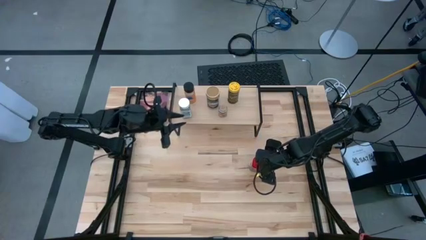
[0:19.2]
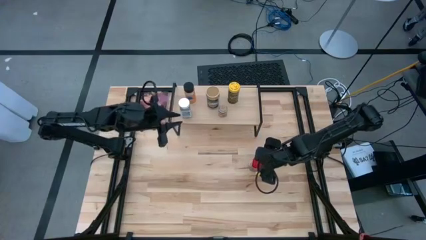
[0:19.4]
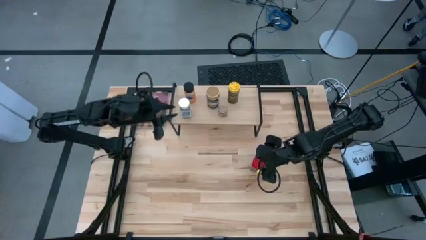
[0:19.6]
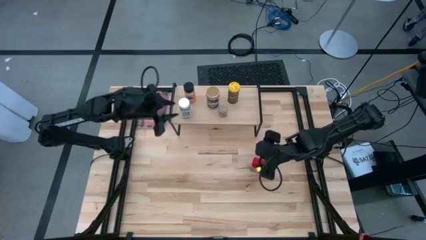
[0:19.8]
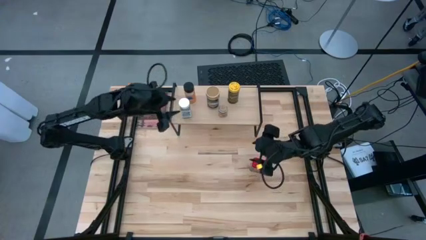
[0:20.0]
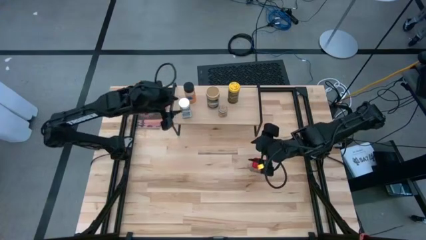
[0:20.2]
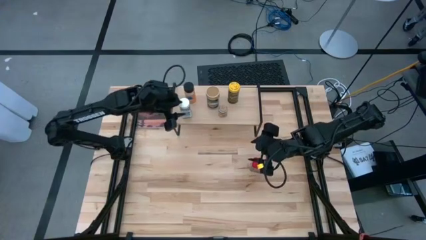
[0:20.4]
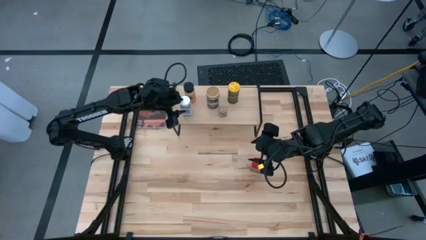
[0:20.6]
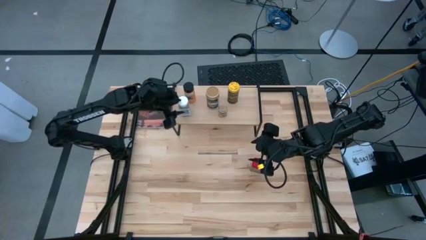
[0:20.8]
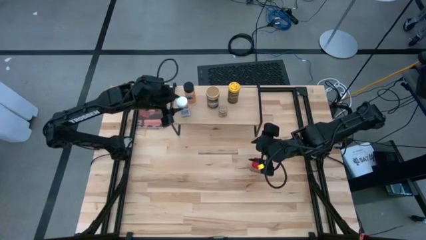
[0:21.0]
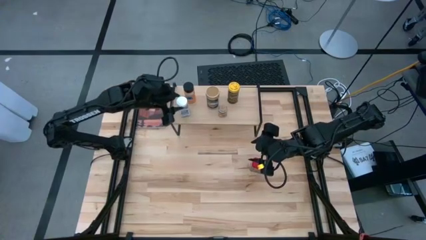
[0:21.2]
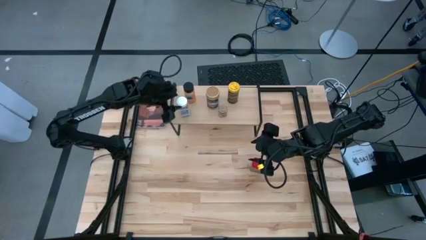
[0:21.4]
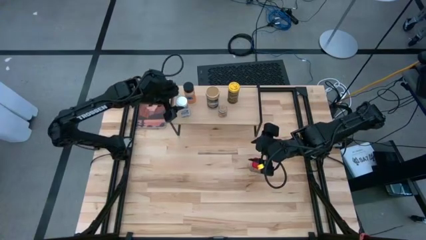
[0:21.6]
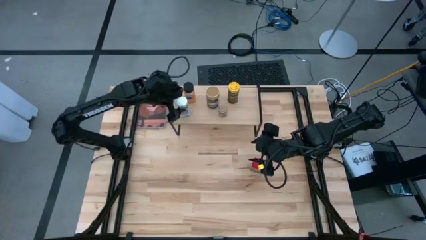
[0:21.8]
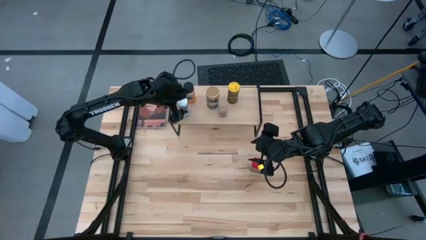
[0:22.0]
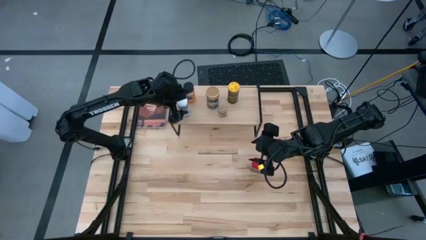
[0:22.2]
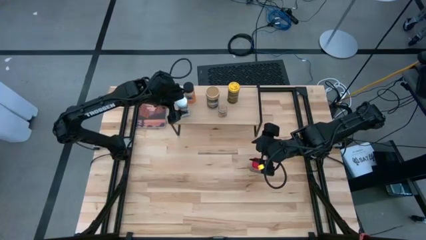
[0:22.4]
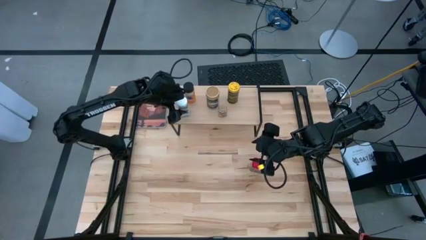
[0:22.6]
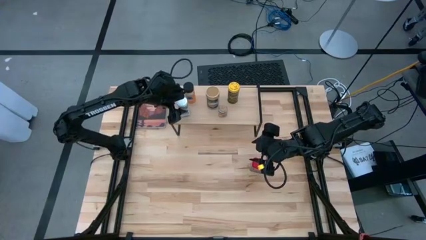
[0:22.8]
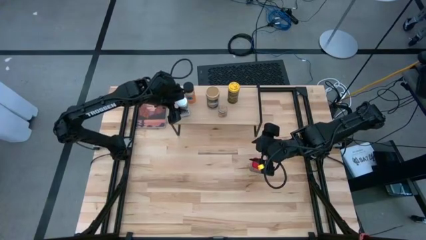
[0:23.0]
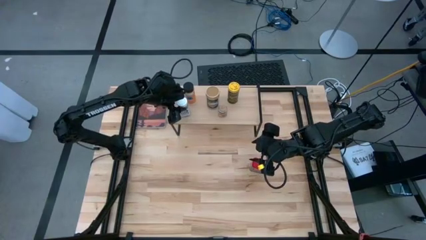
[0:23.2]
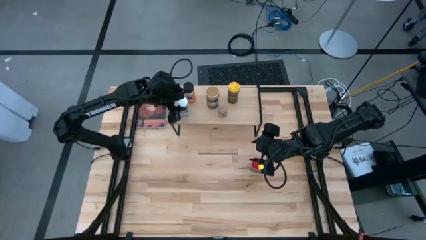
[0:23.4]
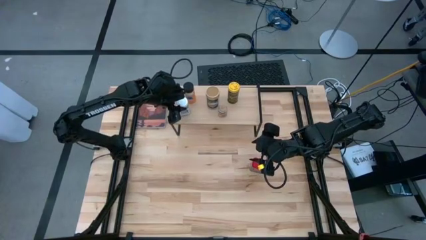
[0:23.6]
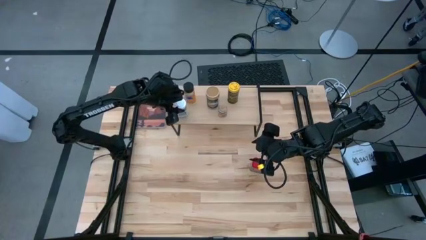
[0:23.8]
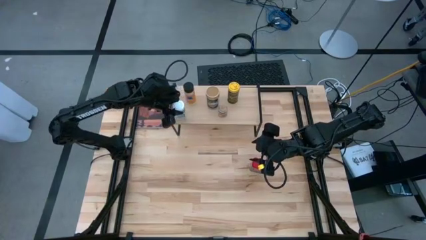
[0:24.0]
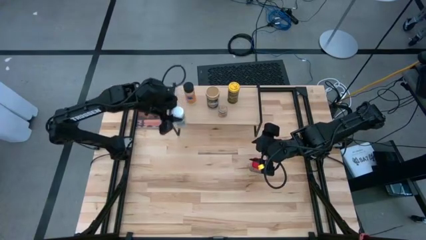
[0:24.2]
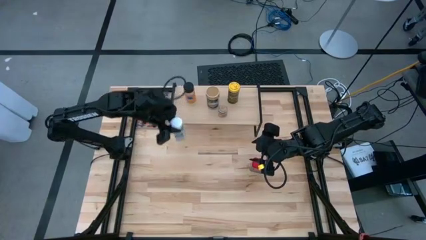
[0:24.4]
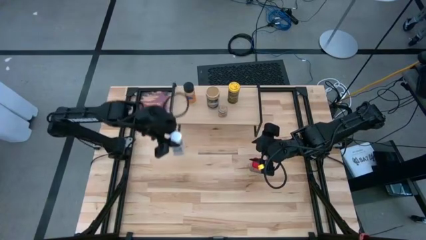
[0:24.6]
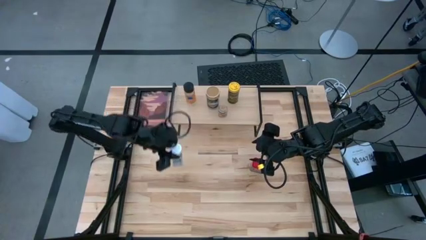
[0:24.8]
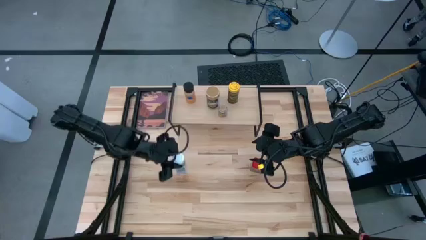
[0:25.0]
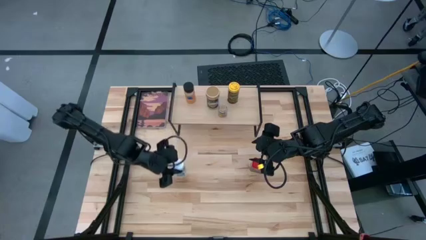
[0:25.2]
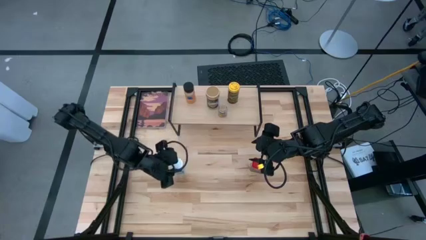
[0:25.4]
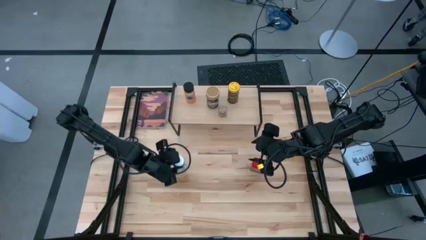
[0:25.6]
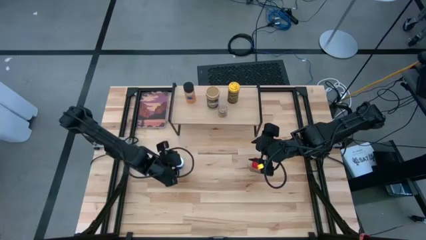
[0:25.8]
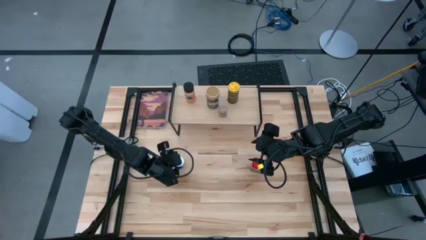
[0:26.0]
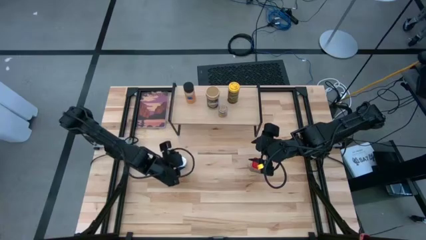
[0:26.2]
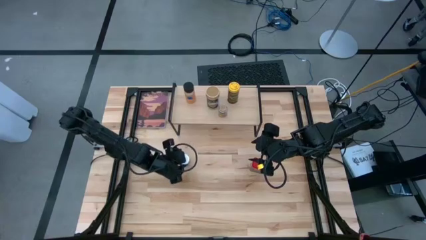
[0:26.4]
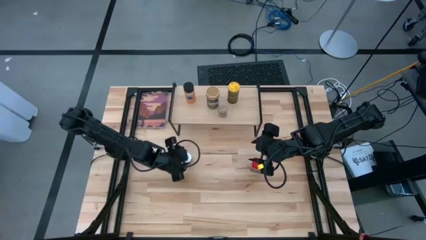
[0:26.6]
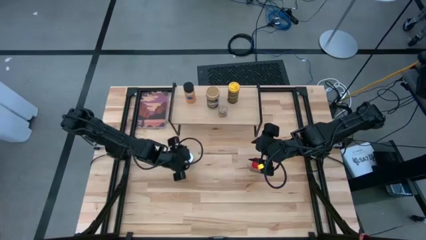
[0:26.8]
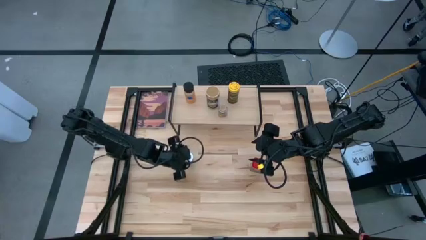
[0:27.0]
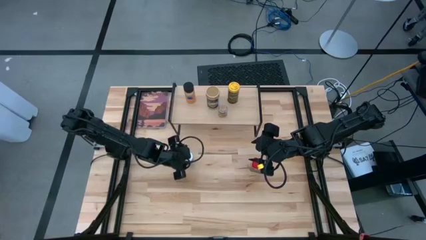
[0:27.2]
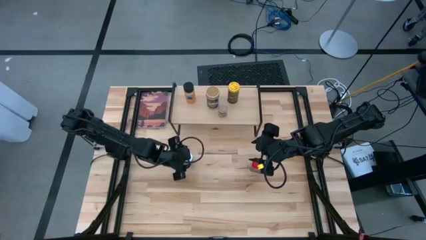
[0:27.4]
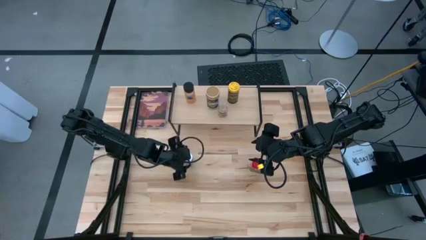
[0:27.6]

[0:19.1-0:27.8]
Task: Shelf spices
Remove the white seasoning bottle from the shelf
